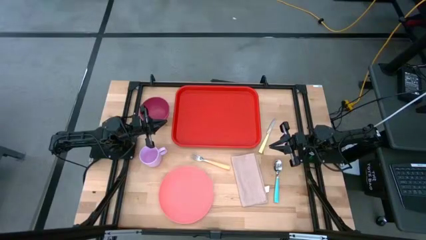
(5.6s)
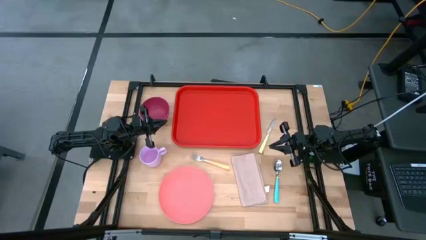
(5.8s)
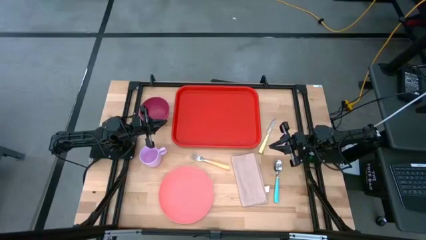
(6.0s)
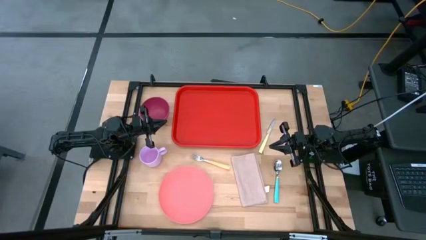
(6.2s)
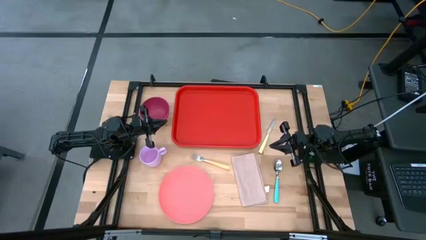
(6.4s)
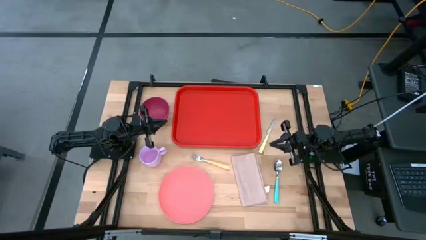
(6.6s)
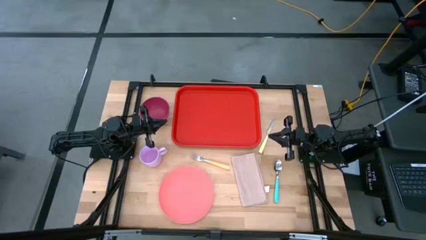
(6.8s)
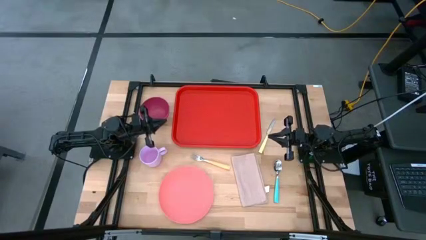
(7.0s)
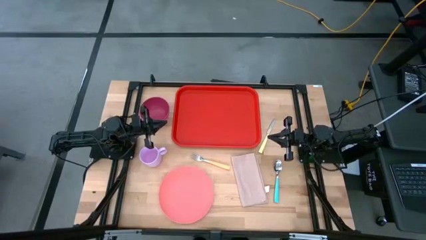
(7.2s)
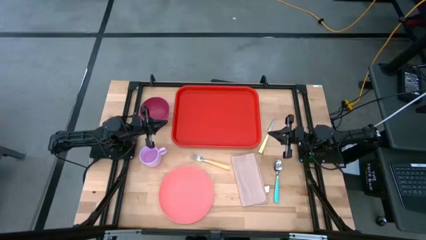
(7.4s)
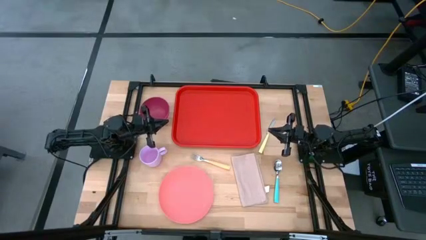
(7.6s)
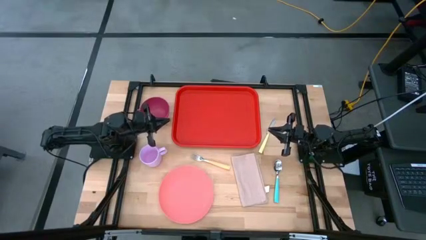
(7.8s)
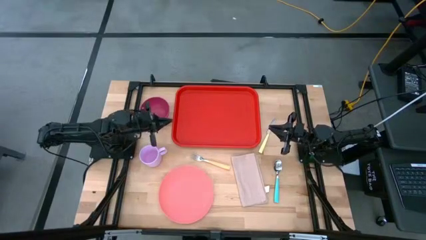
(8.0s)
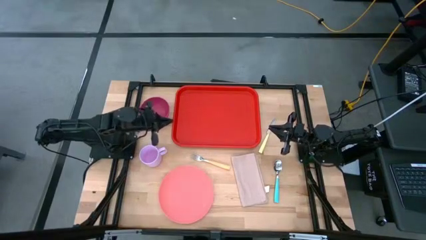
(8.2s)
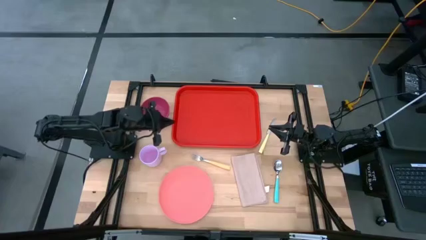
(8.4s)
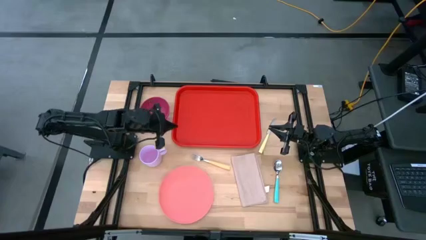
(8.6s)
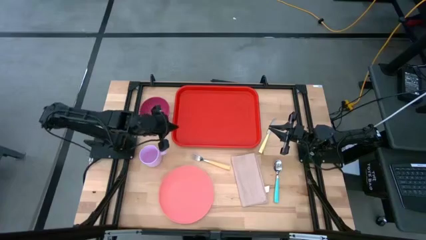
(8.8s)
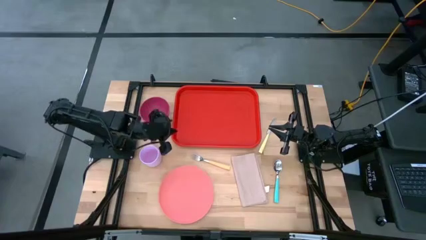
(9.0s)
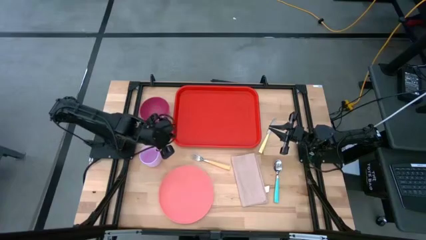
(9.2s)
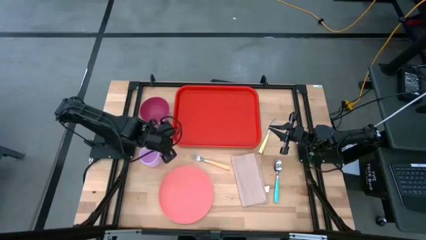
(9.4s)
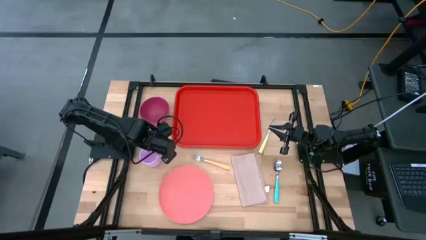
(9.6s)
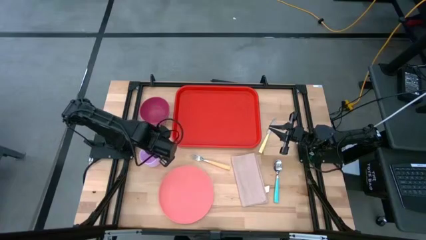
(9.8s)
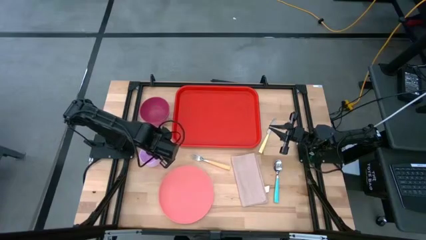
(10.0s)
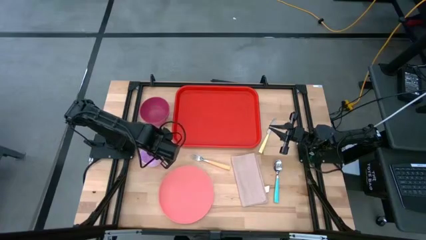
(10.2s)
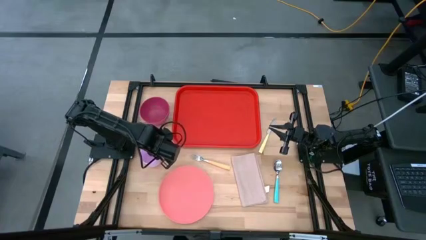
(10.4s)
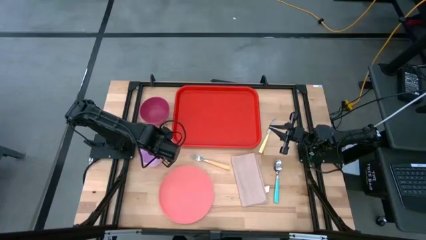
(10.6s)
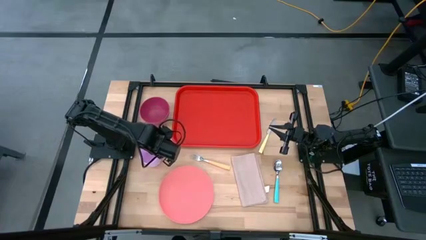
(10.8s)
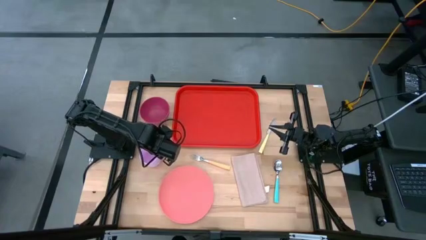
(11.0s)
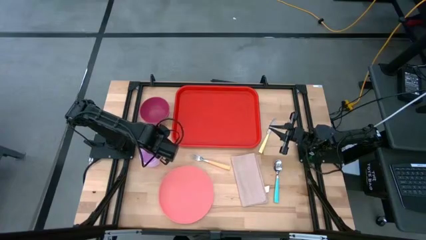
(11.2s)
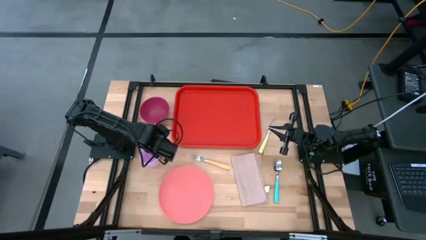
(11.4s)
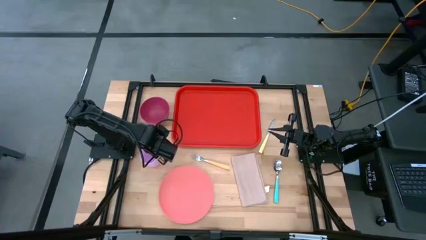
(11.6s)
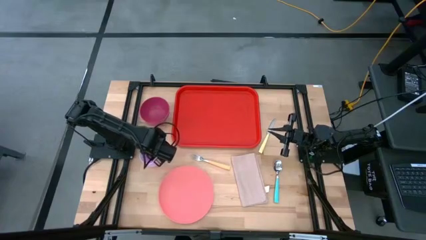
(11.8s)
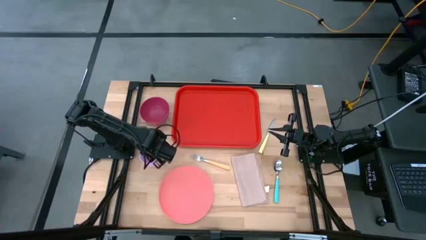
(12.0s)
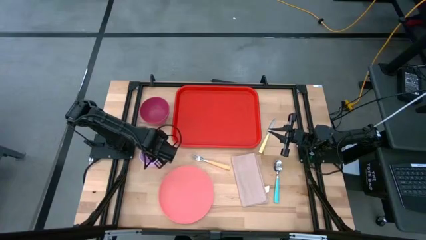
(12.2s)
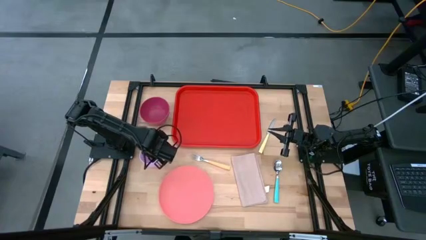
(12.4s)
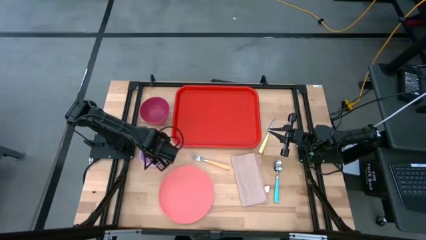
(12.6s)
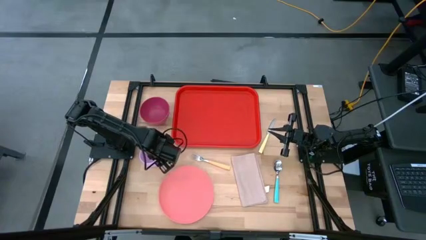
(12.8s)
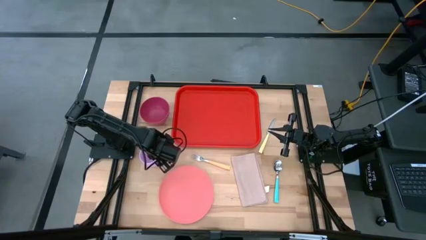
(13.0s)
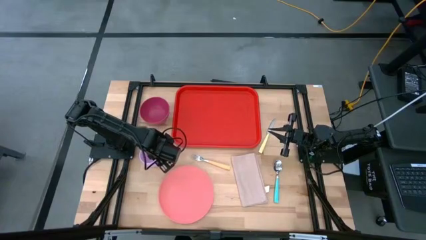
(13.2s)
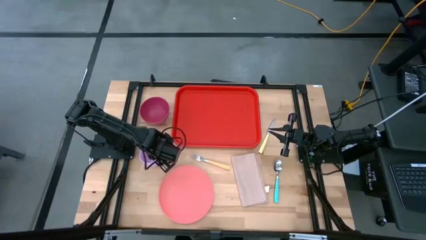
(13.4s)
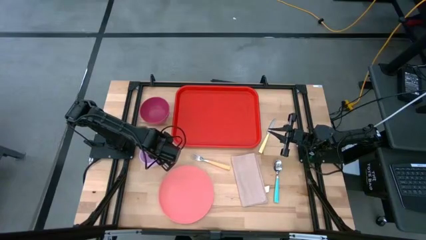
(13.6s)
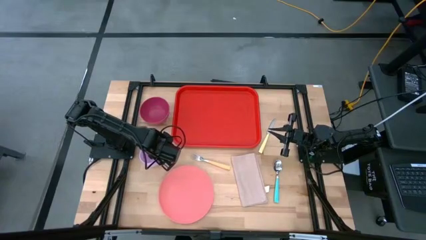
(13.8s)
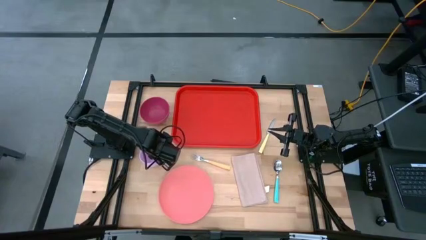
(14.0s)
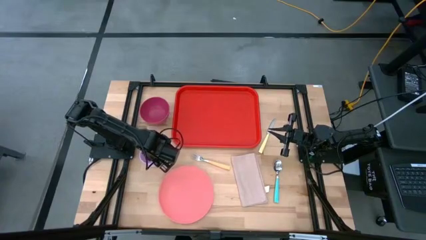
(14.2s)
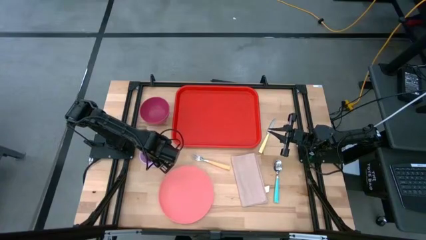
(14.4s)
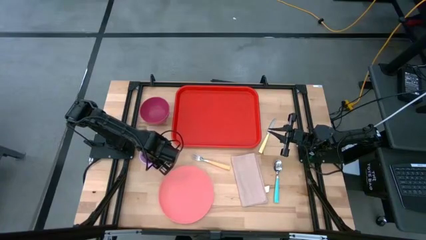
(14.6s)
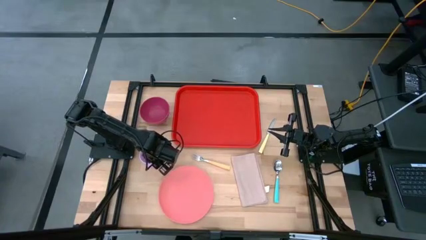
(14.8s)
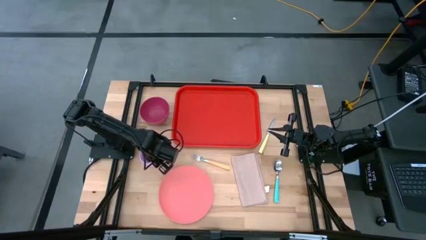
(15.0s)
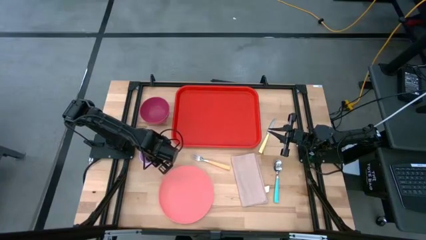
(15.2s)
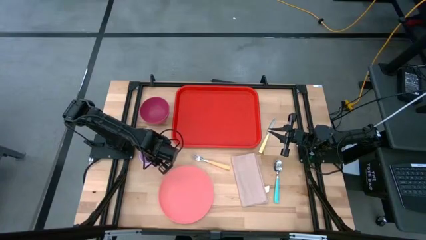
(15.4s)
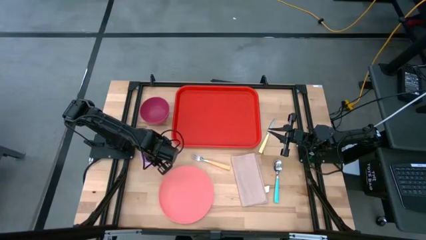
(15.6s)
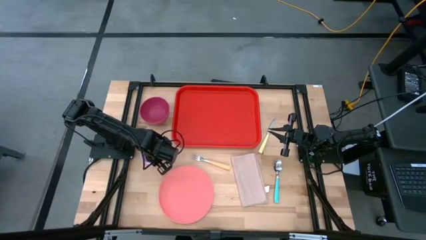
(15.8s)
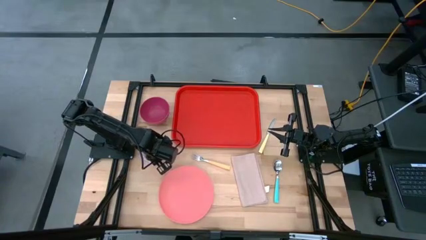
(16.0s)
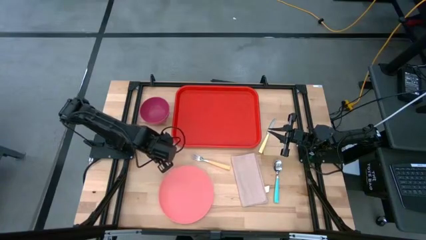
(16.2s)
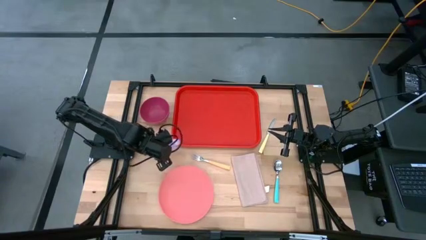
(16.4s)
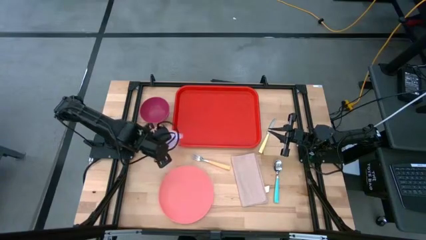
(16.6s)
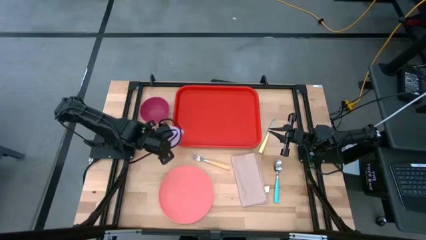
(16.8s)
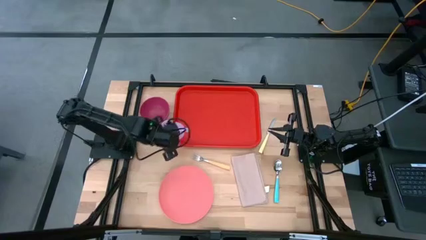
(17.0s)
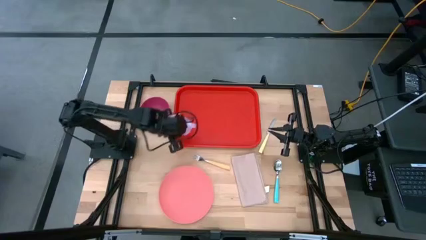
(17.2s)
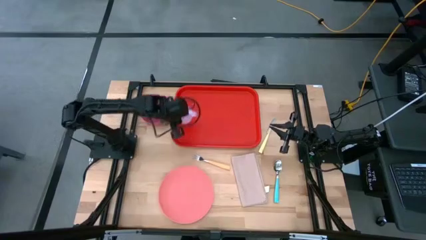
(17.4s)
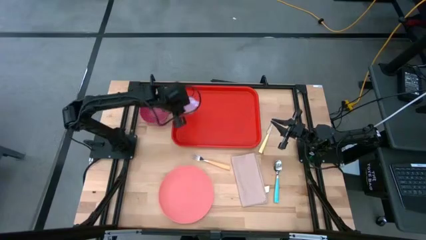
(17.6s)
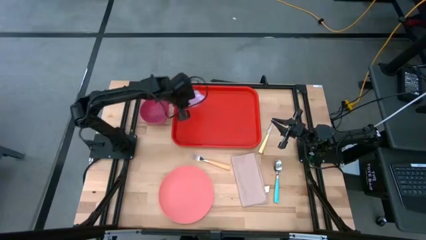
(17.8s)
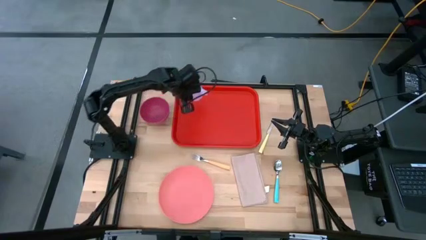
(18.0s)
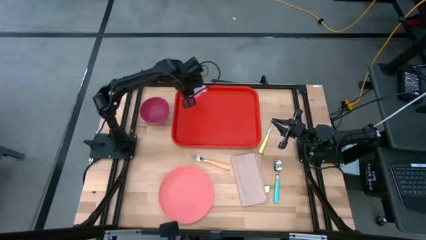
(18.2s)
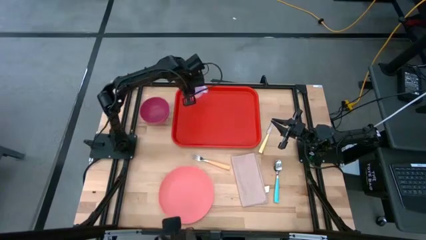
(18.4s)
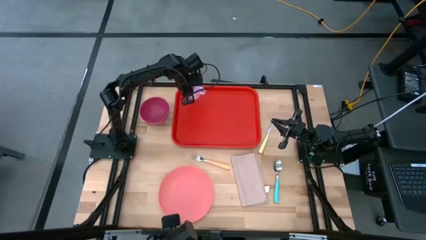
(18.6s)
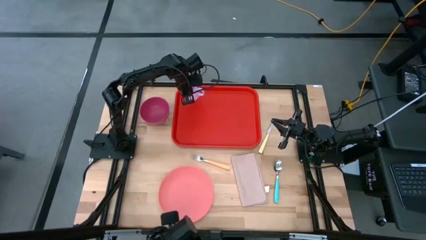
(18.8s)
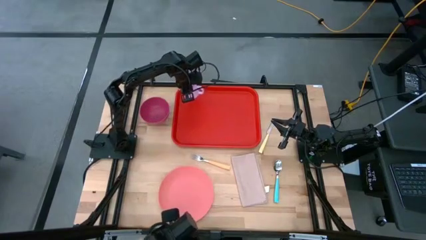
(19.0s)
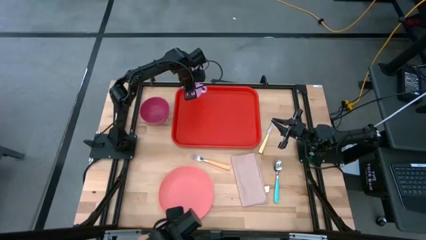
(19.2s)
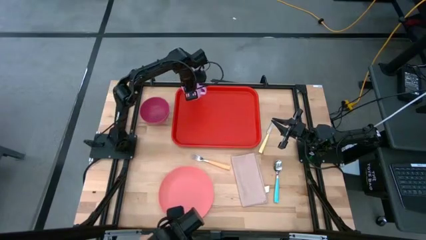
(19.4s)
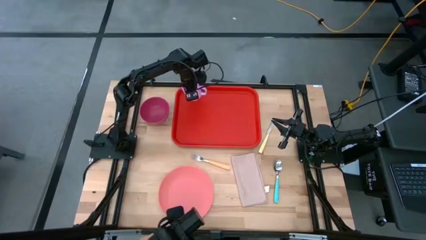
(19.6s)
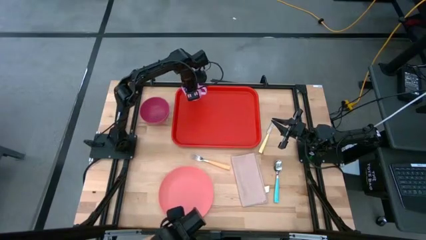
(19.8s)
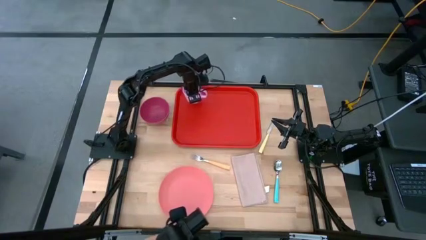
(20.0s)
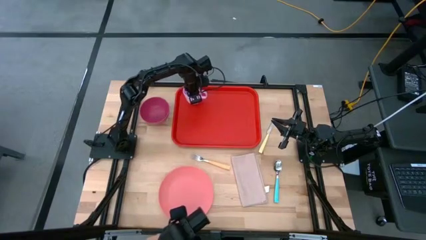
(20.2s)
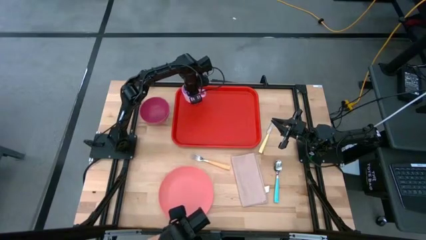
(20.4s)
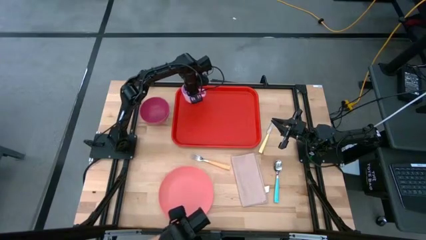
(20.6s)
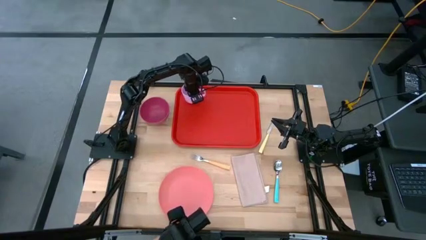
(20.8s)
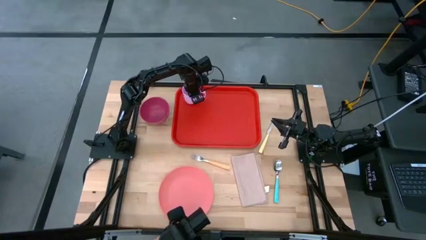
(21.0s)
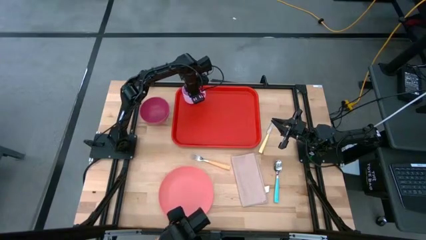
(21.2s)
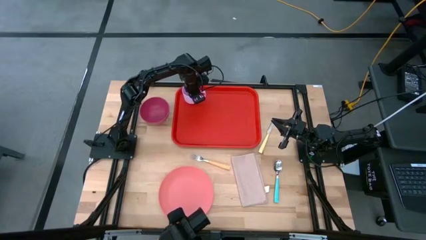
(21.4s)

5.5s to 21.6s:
Task: Set up tray
Put the pink mug on the top left of the red serving tray
